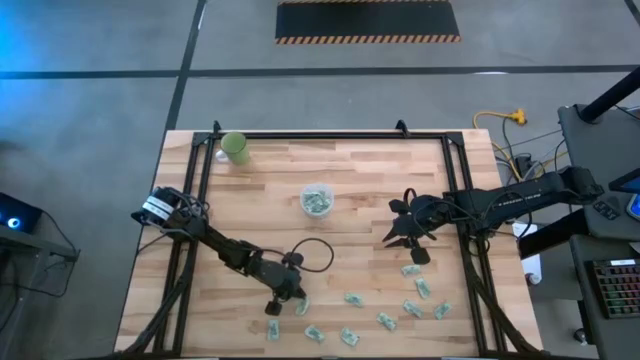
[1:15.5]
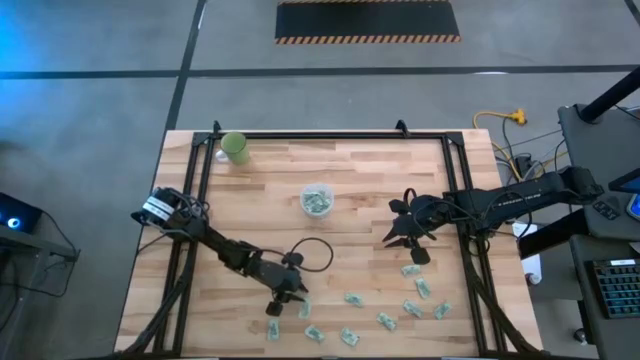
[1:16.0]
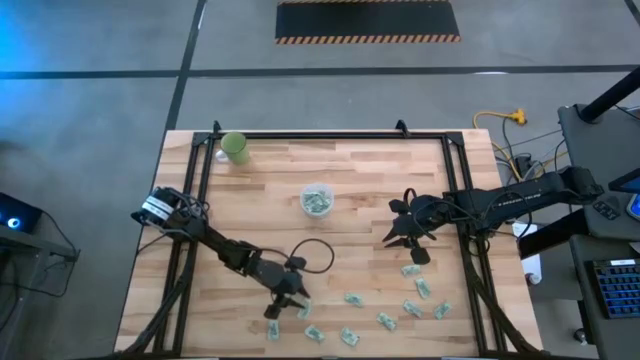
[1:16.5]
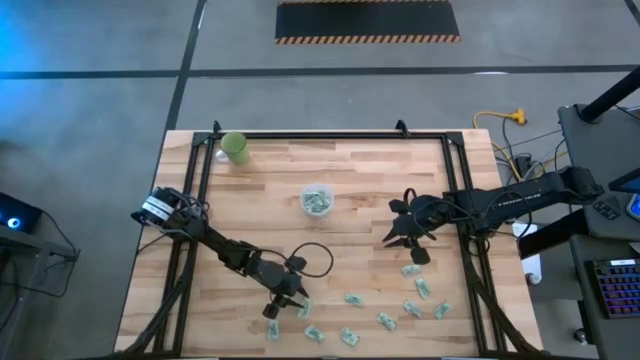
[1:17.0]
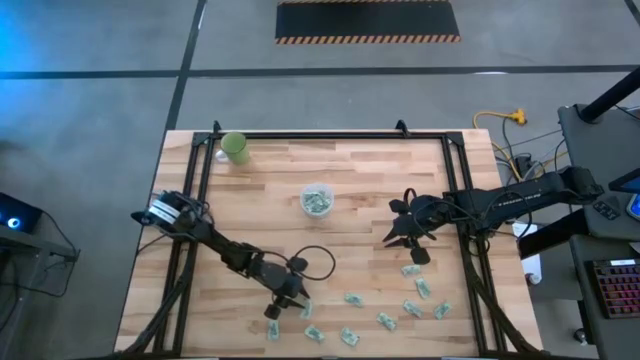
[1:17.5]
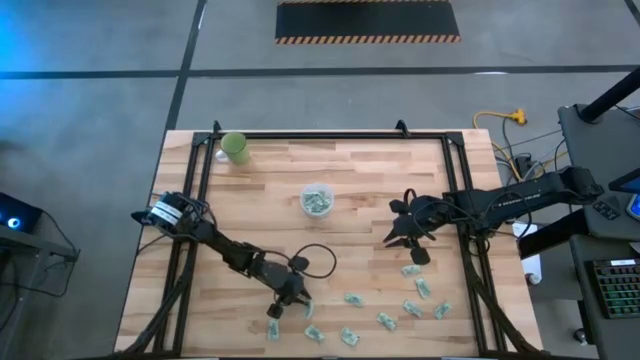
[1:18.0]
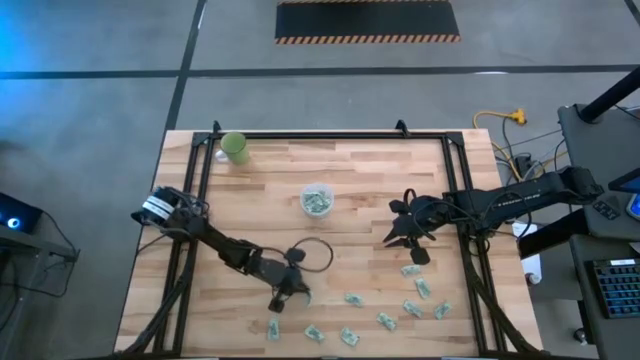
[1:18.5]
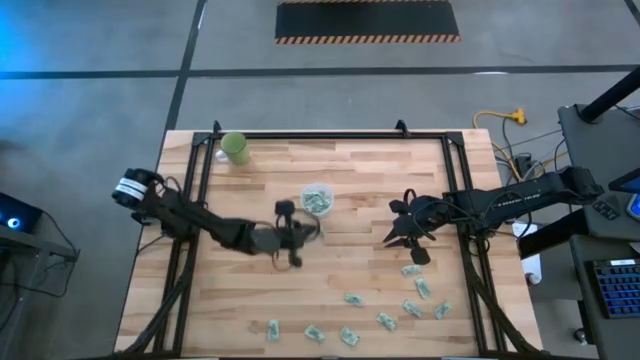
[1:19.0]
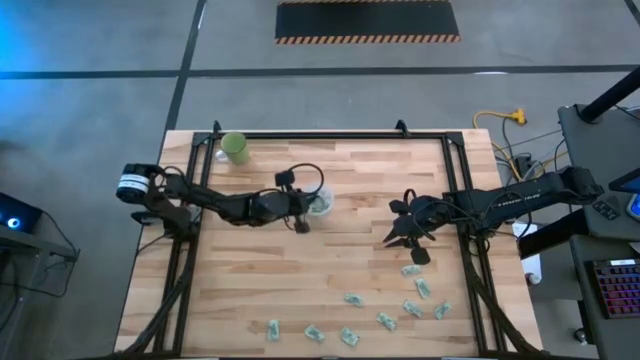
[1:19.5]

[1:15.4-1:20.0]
Task: Pick and place Stevia / Truvia into bins
Put the green stevia packet into the transparent container

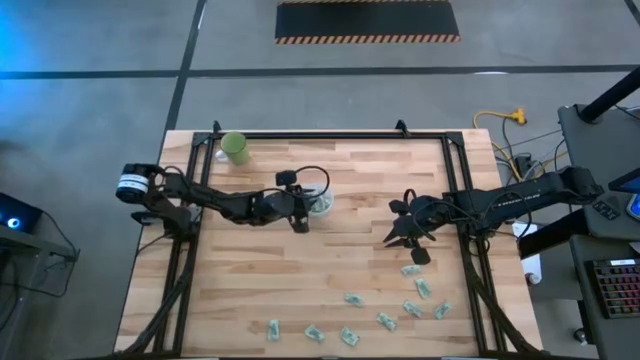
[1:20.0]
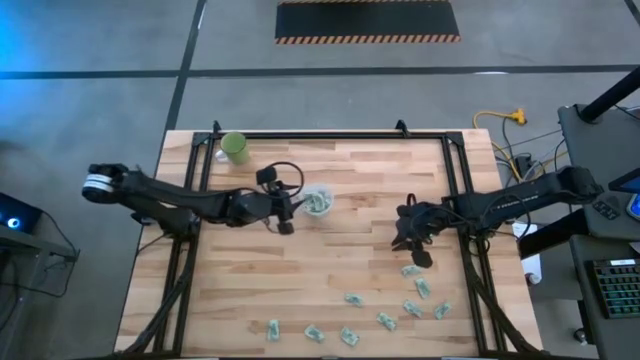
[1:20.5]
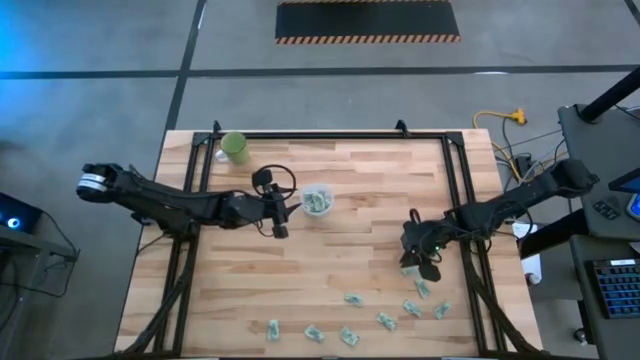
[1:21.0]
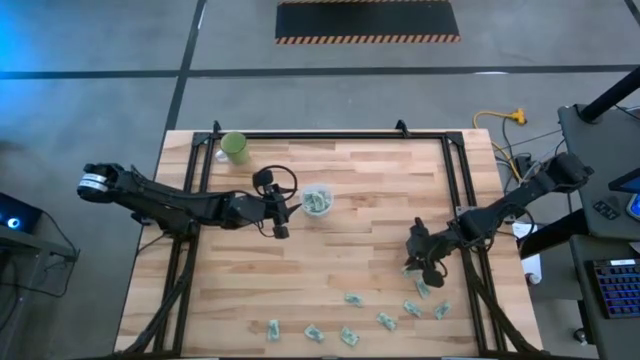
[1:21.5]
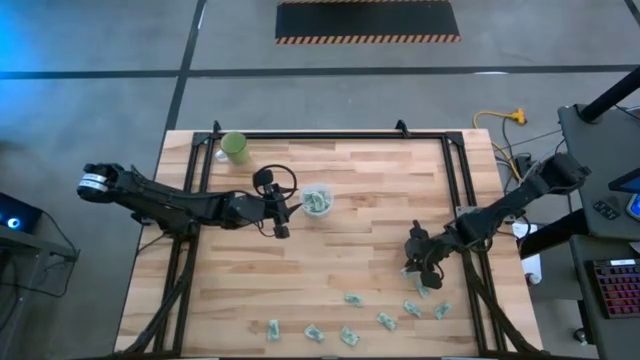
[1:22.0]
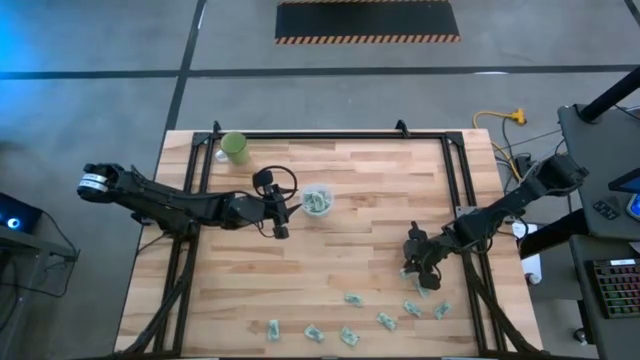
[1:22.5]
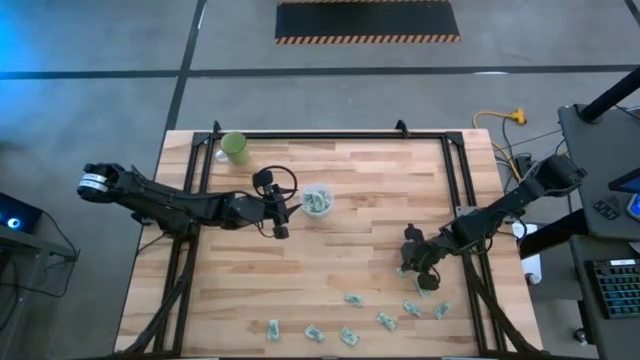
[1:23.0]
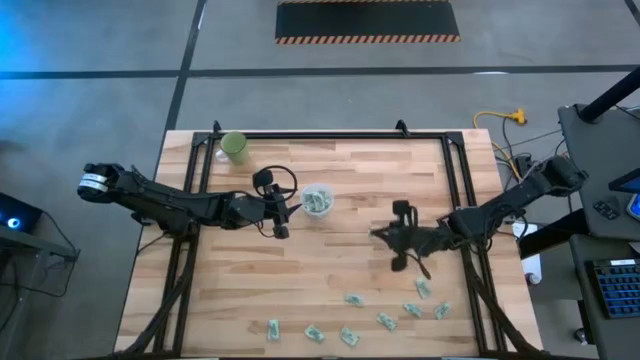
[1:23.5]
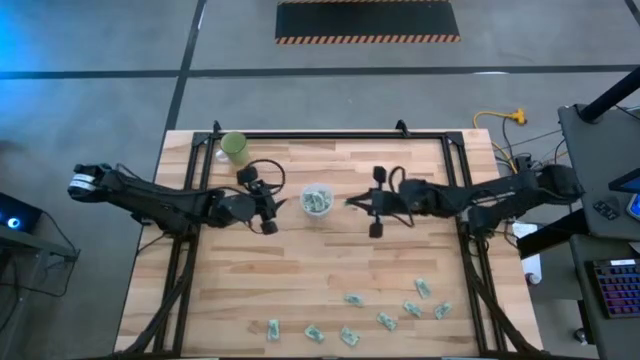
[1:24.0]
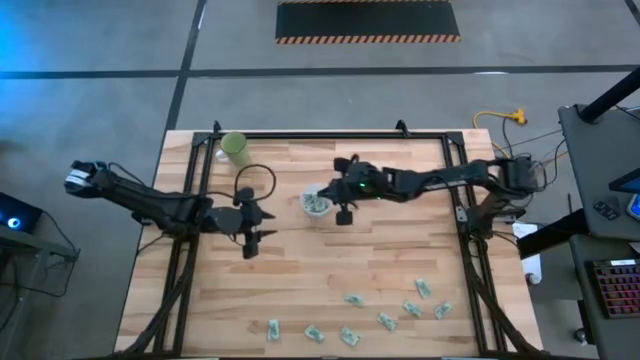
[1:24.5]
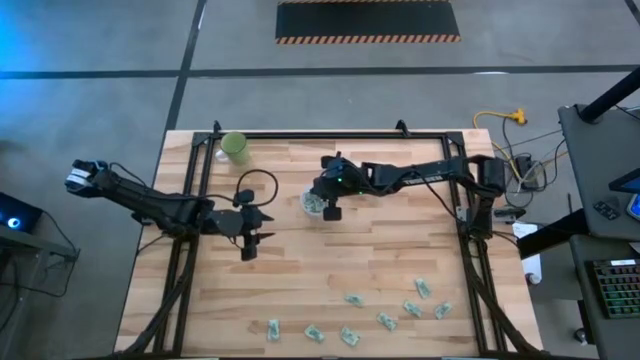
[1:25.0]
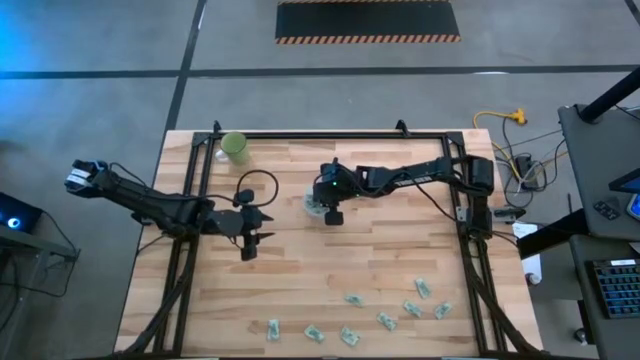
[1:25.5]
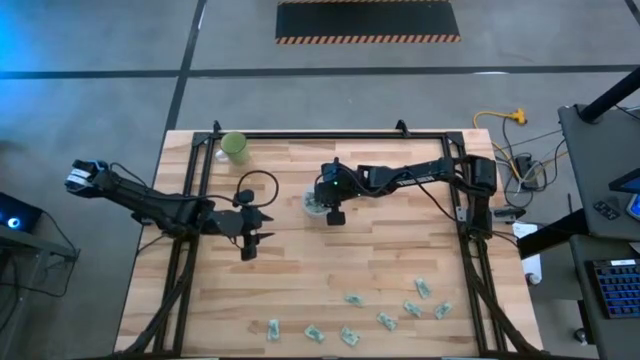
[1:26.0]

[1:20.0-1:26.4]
Put the green stevia packet into the transparent container

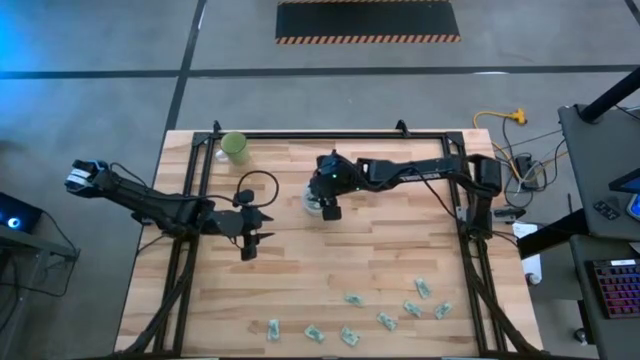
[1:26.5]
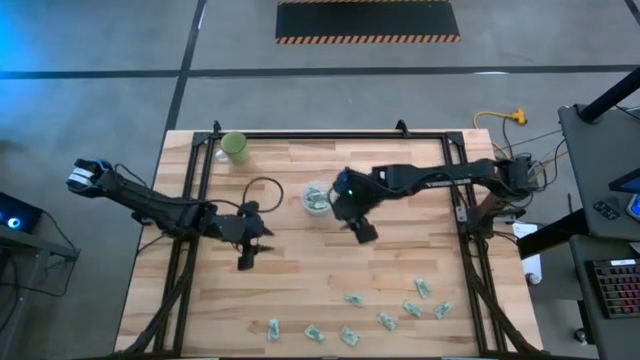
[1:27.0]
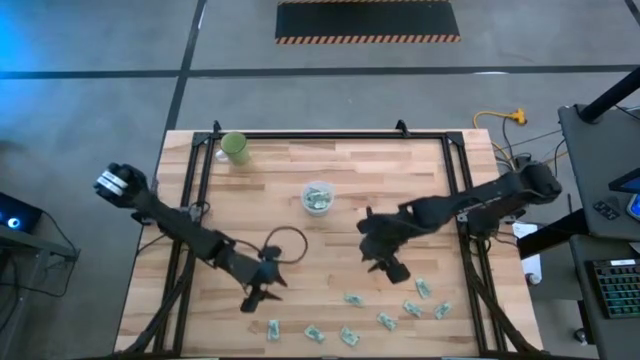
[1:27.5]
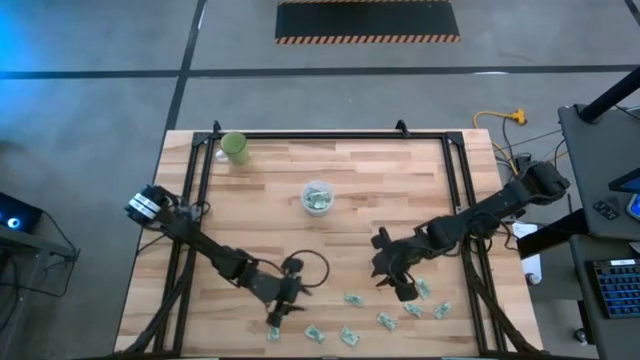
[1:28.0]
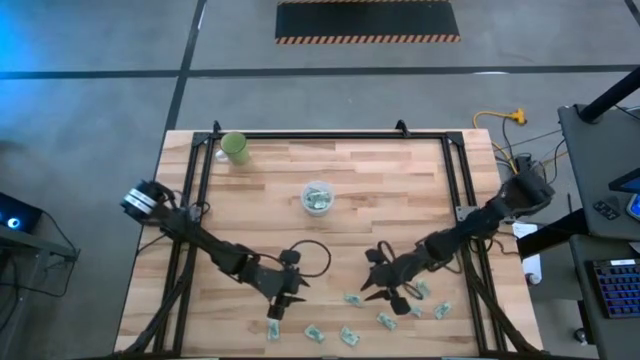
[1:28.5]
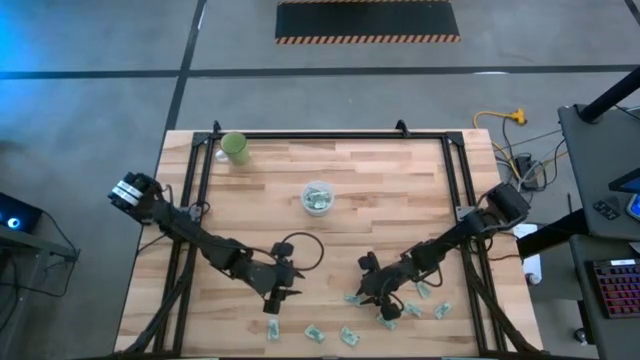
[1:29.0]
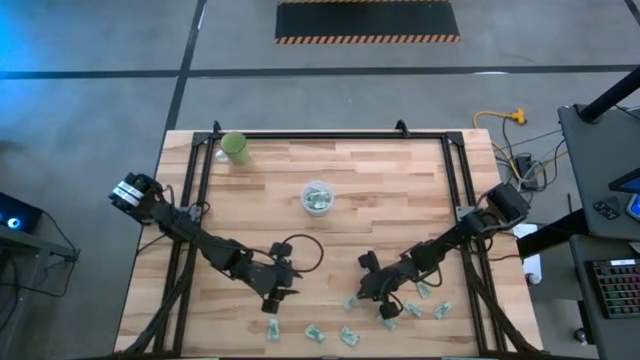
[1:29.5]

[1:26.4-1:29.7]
Put the green stevia packet into the transparent container

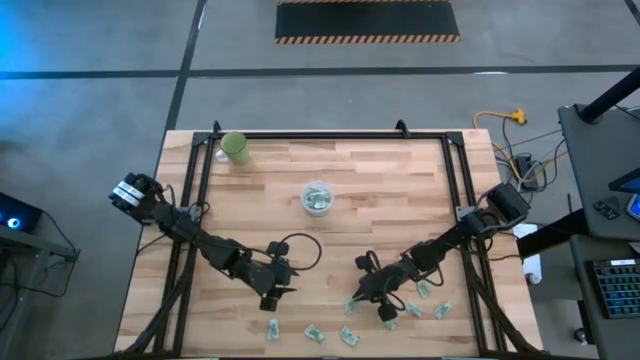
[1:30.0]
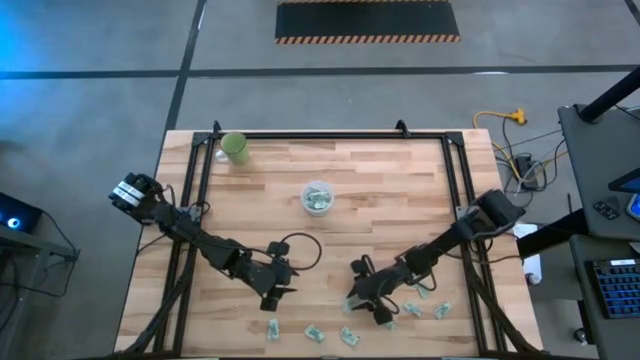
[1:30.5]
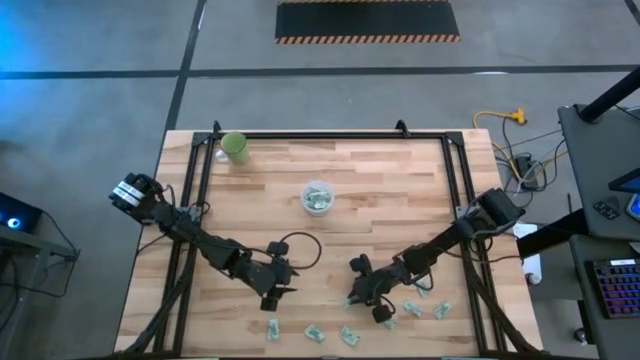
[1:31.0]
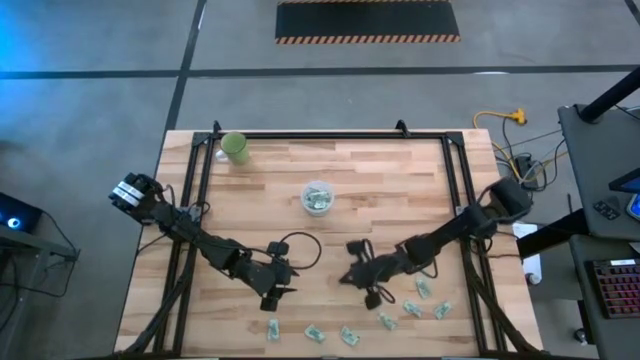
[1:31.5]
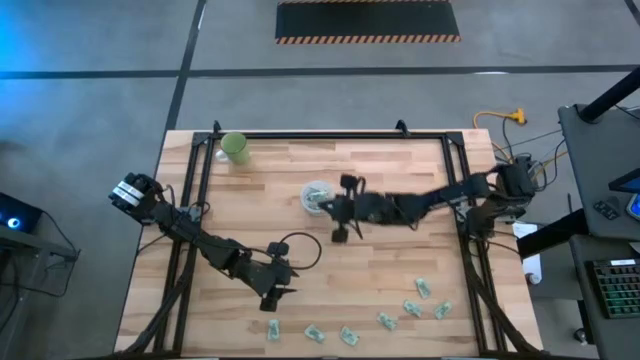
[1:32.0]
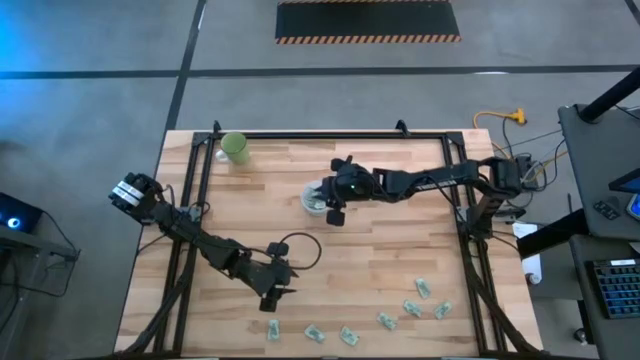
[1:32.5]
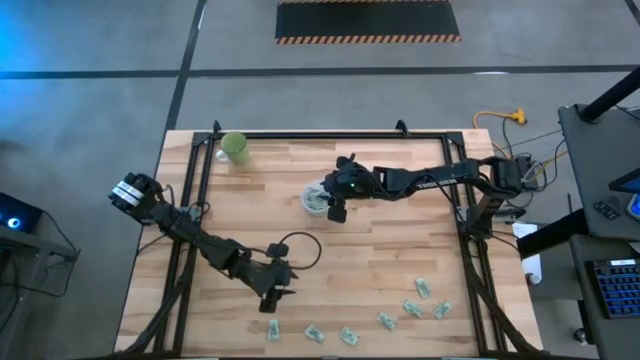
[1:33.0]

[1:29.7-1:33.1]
Put the green stevia packet into the transparent container

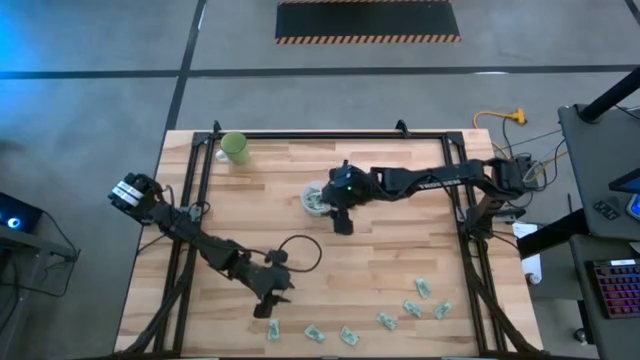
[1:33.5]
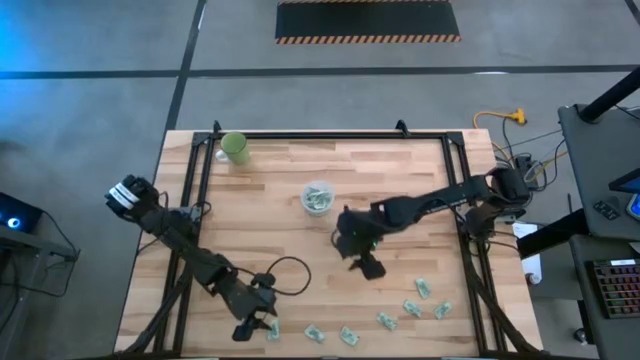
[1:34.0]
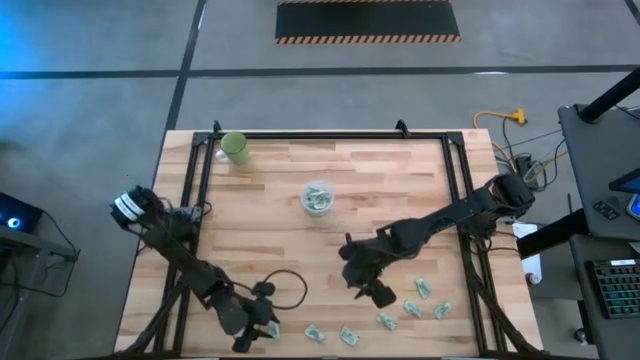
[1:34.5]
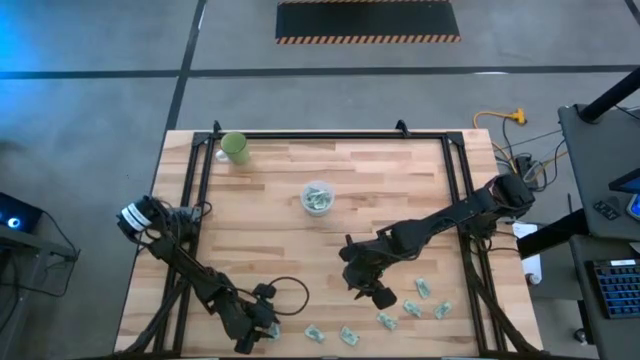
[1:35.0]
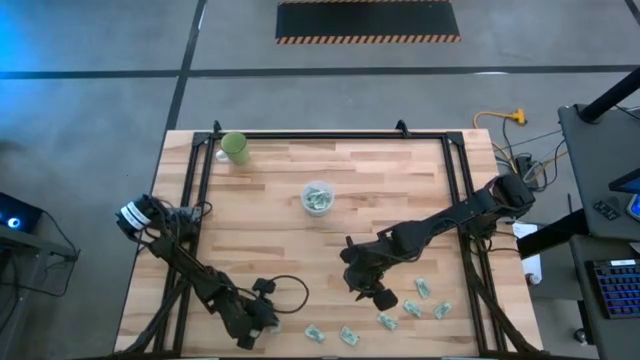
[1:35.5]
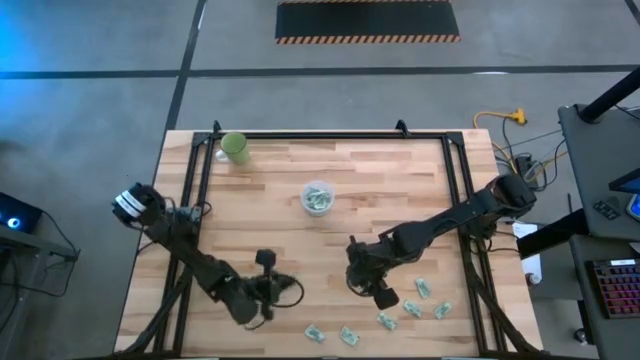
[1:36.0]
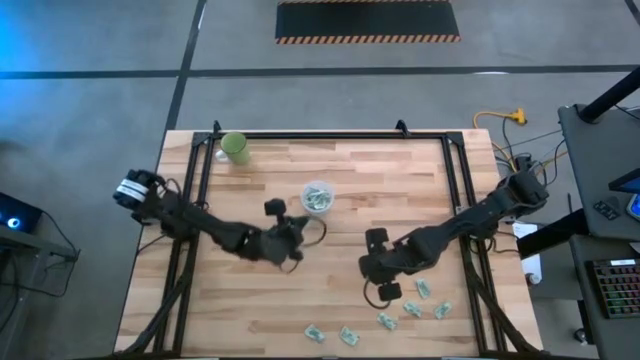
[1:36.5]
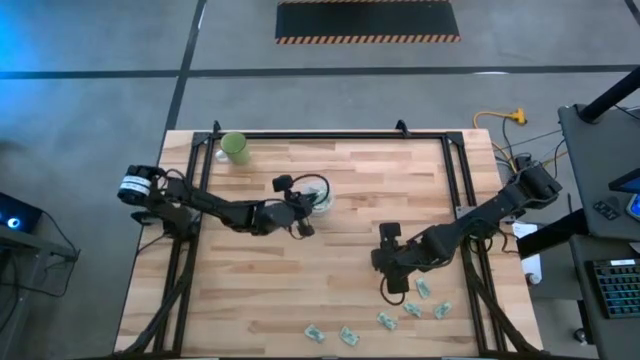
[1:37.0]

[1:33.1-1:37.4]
Put the green stevia packet into the transparent container
